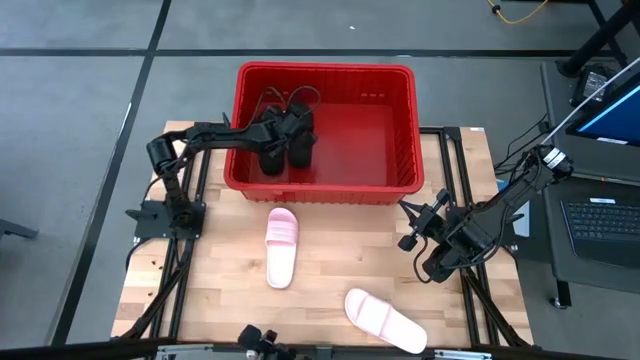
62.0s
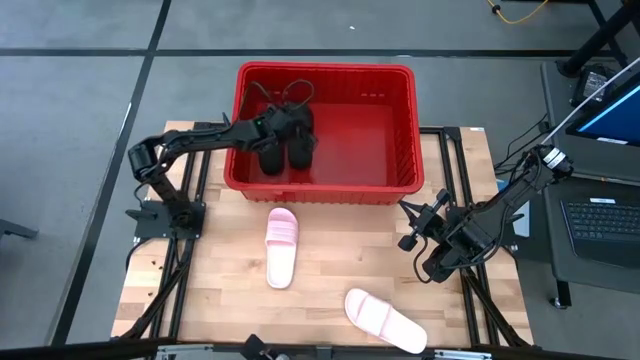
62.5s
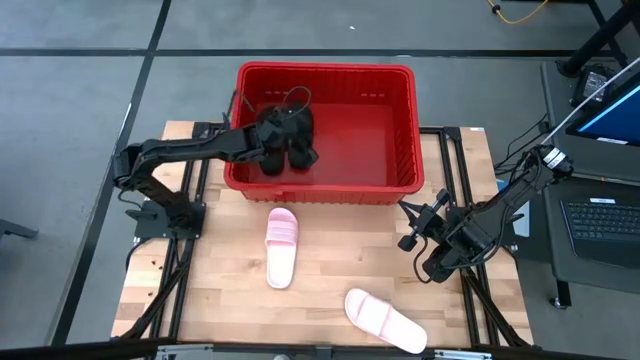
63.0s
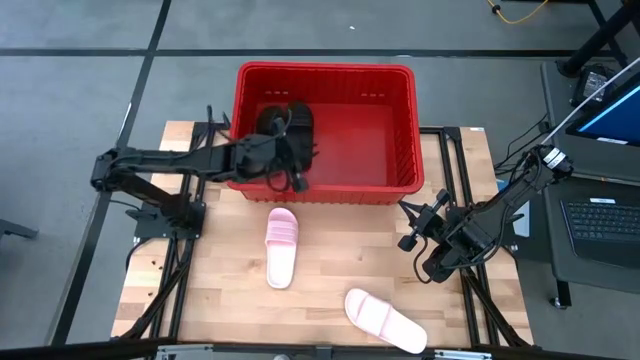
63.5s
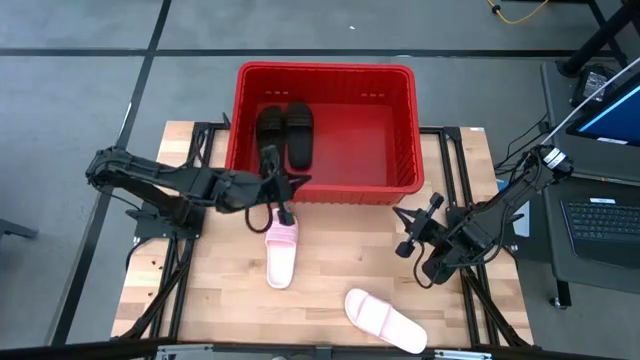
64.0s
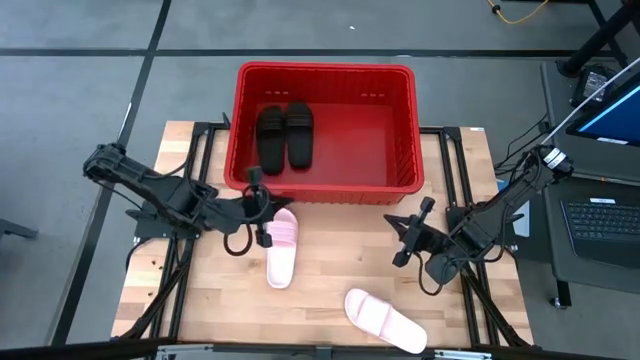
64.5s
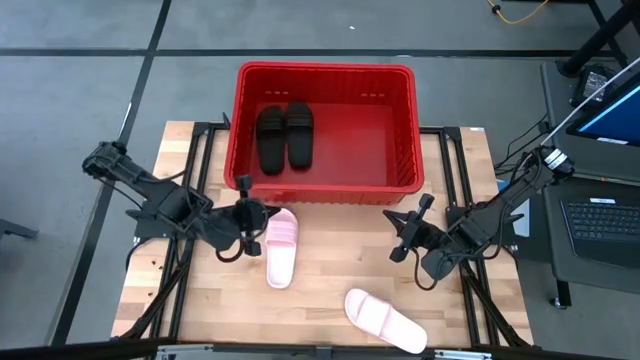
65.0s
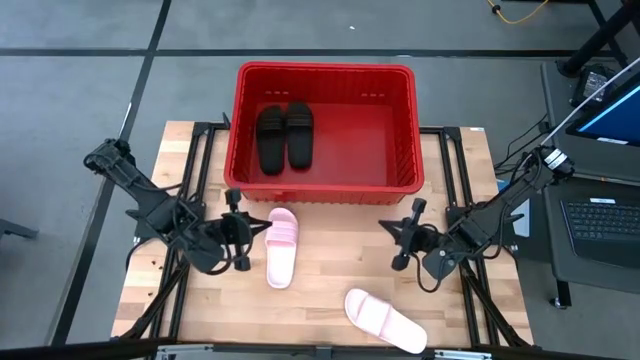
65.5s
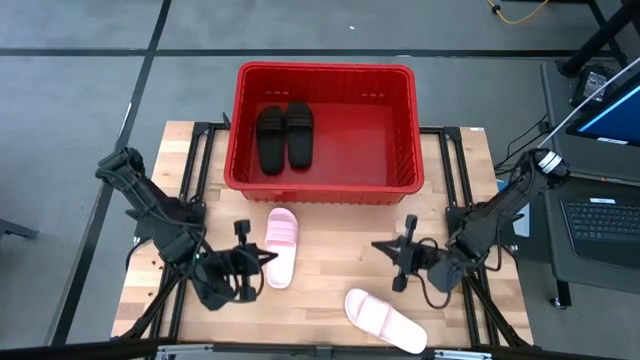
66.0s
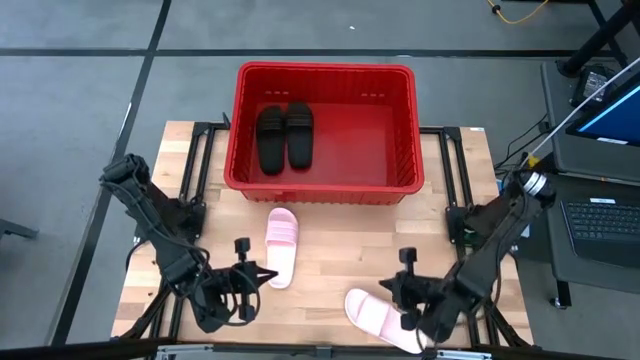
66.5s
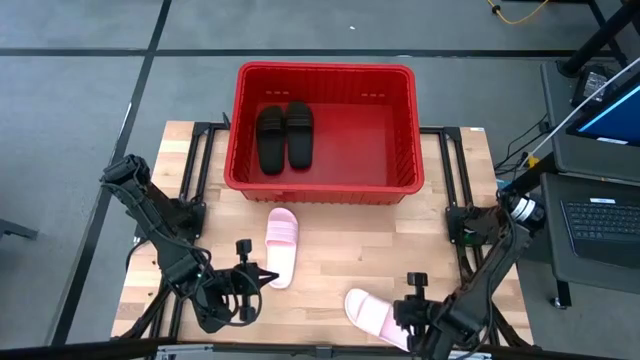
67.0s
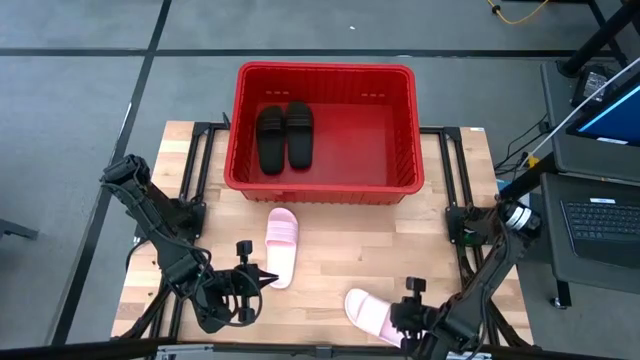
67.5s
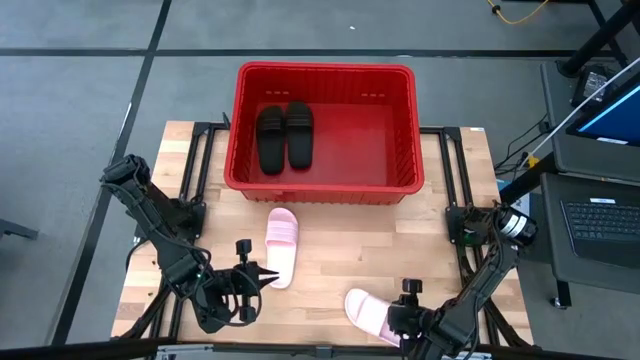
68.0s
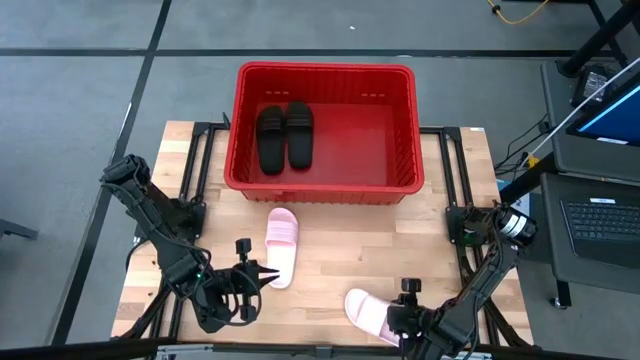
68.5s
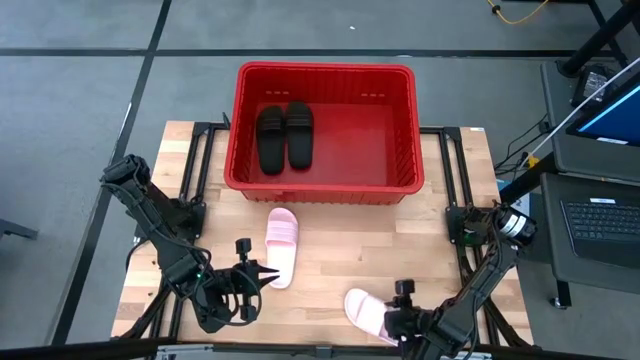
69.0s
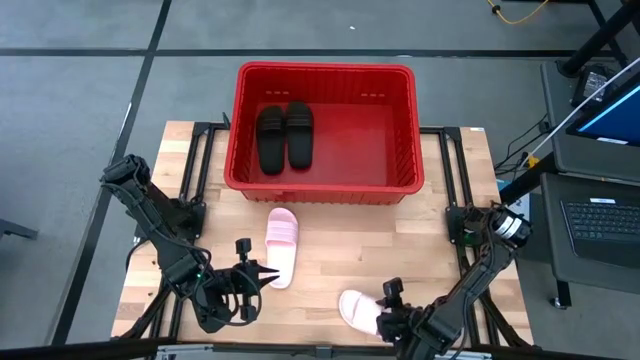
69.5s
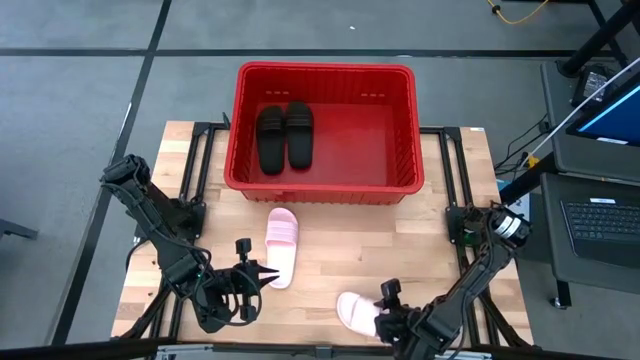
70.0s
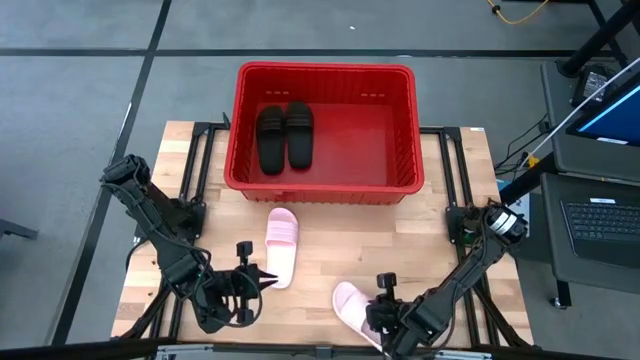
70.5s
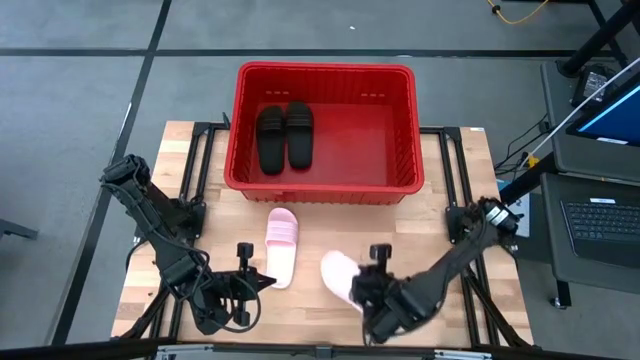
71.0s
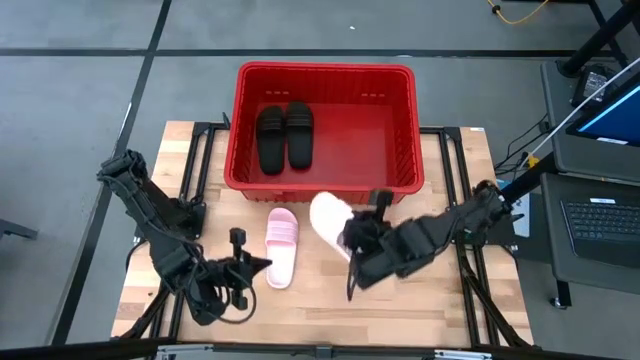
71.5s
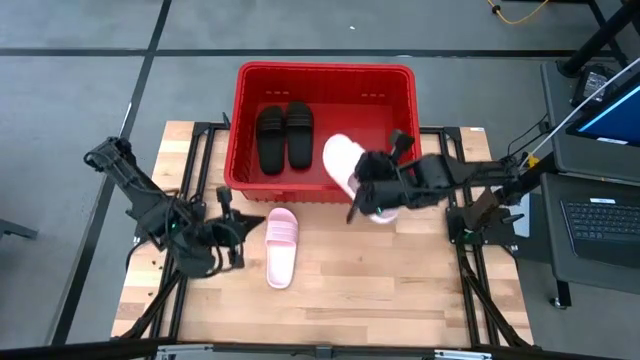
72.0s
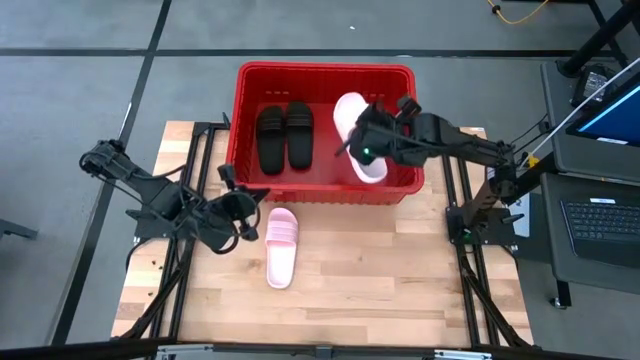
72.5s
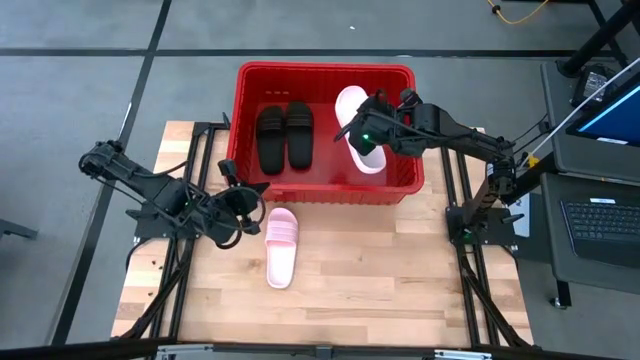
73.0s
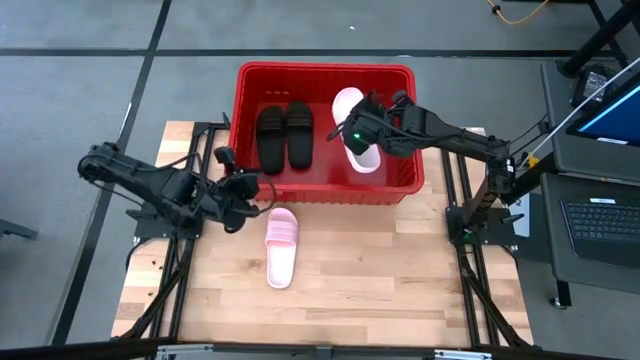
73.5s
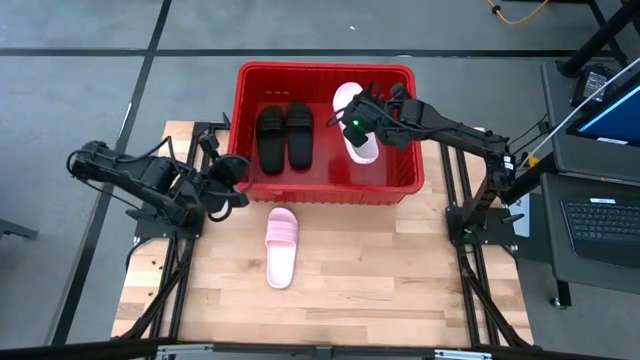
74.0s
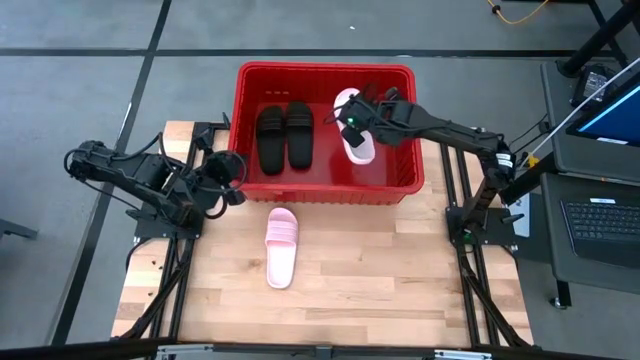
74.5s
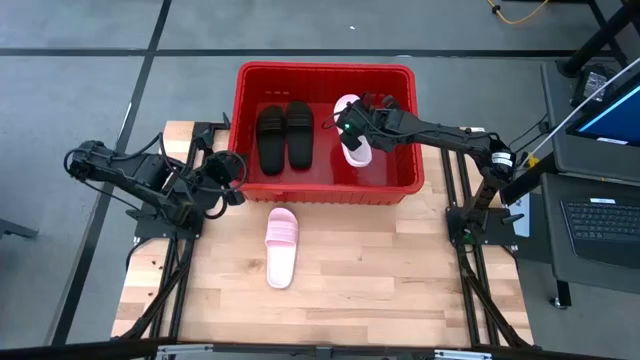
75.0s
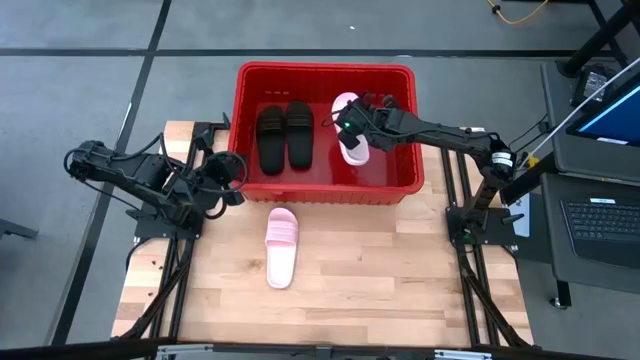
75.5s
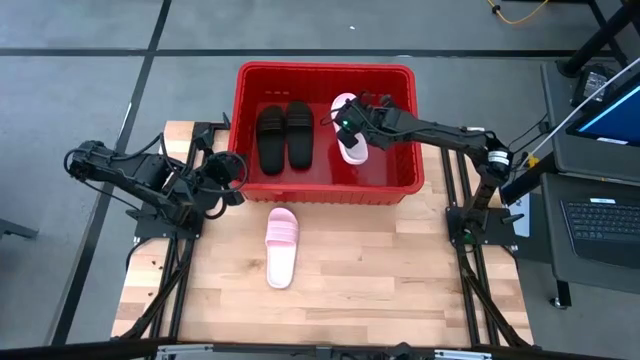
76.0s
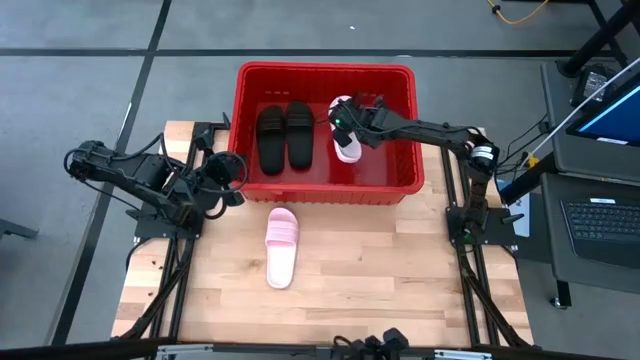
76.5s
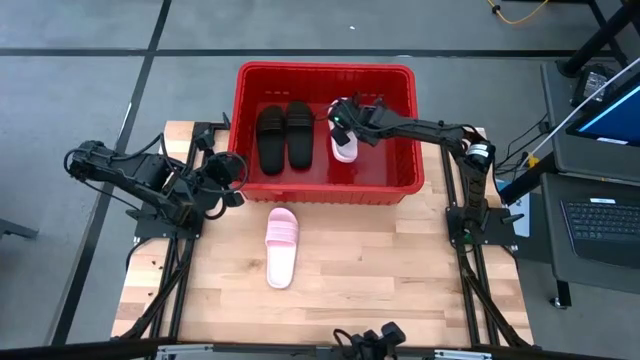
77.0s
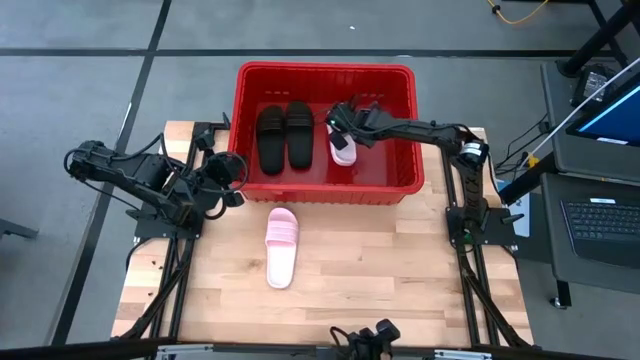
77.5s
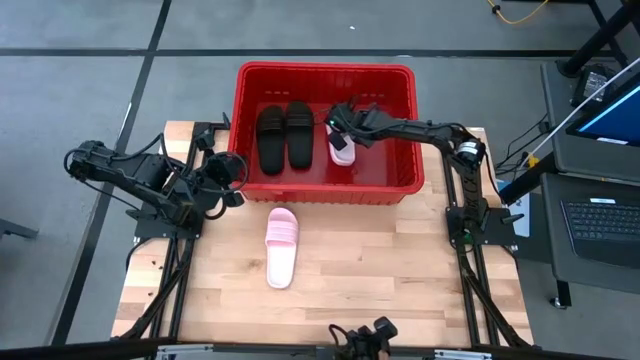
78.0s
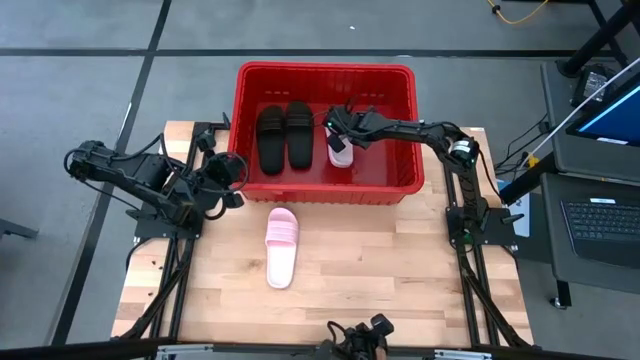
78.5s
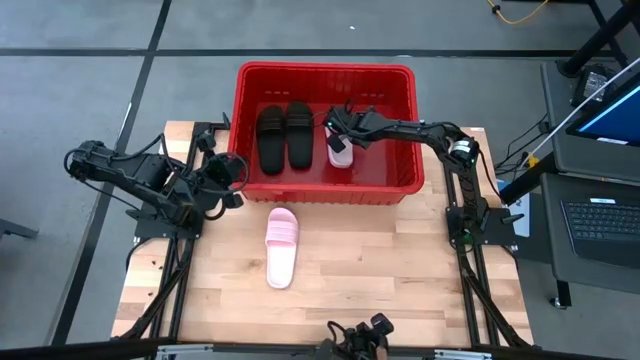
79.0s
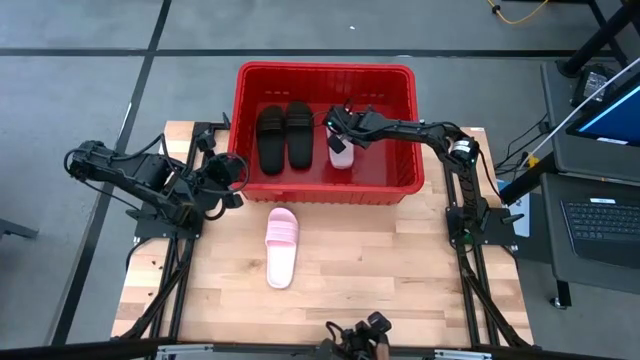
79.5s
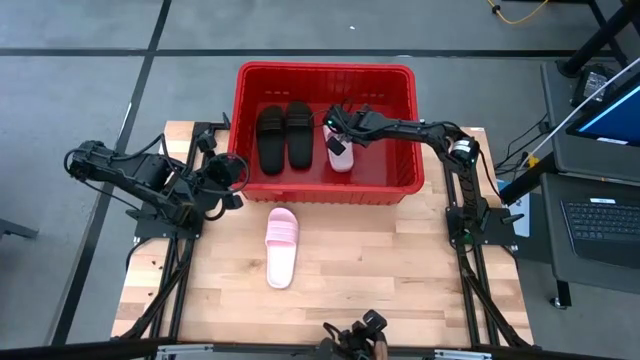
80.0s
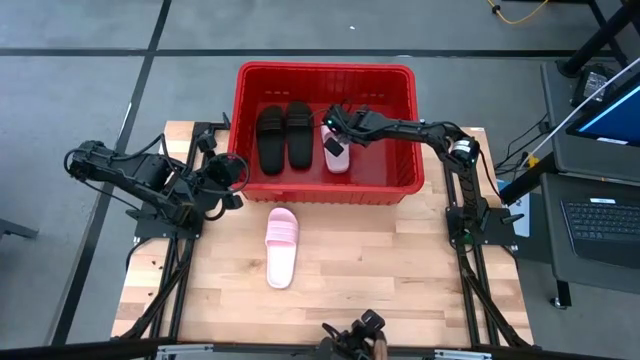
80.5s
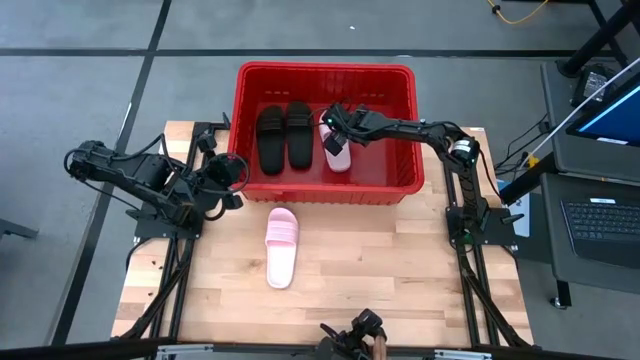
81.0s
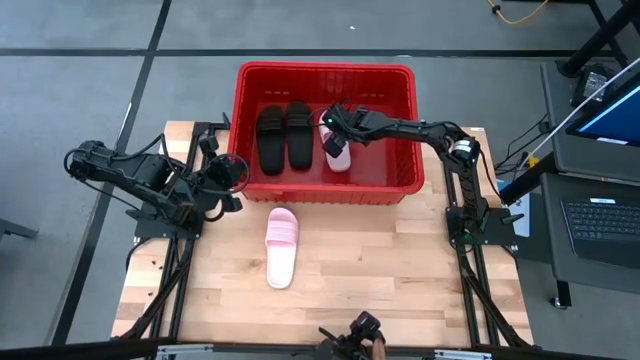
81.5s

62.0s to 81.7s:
Task: Pick and place slides into bin
Put the bottom pink slipper into the red bin
